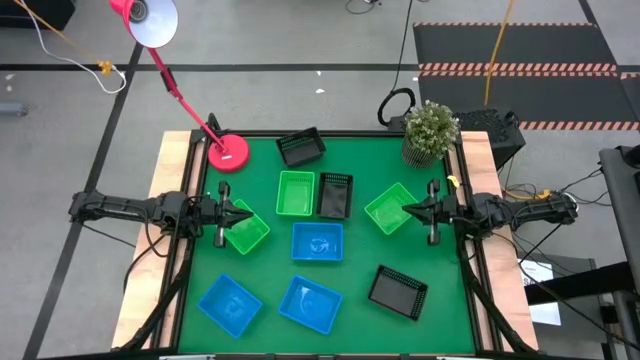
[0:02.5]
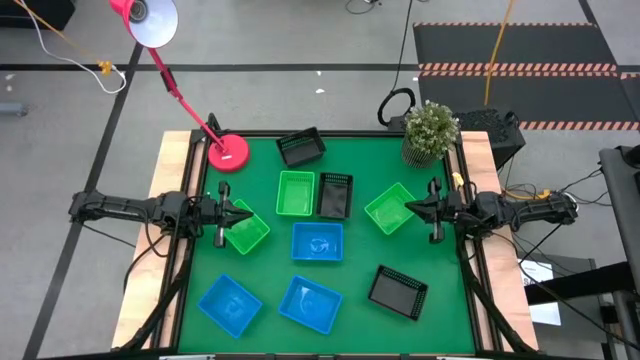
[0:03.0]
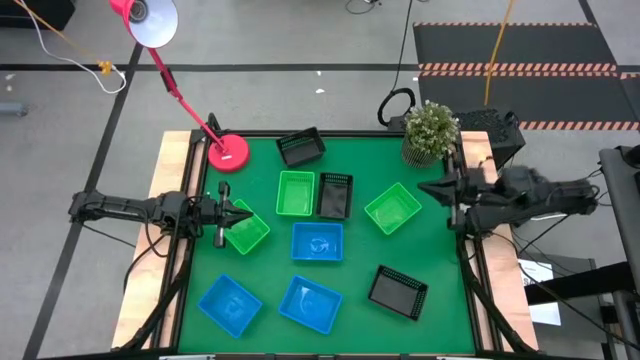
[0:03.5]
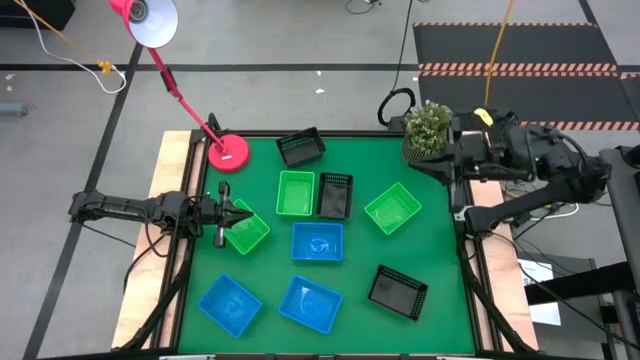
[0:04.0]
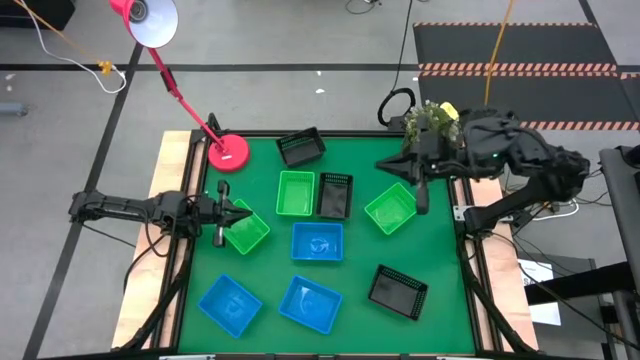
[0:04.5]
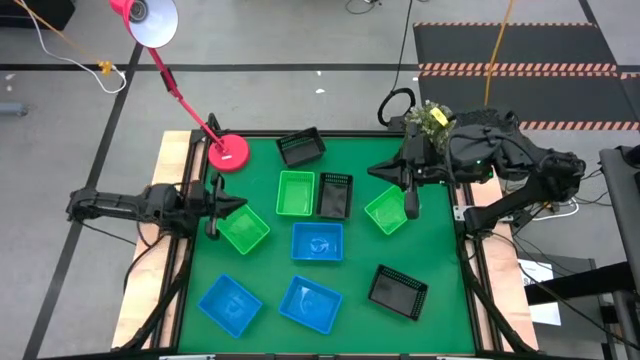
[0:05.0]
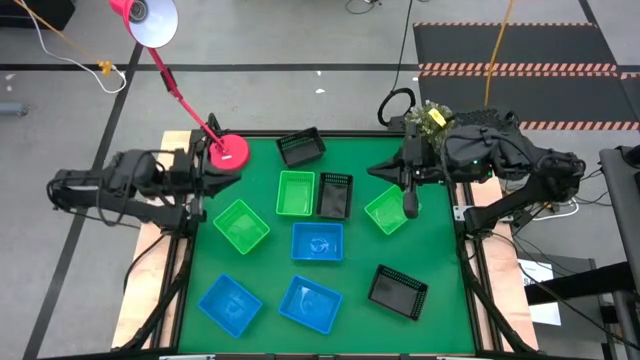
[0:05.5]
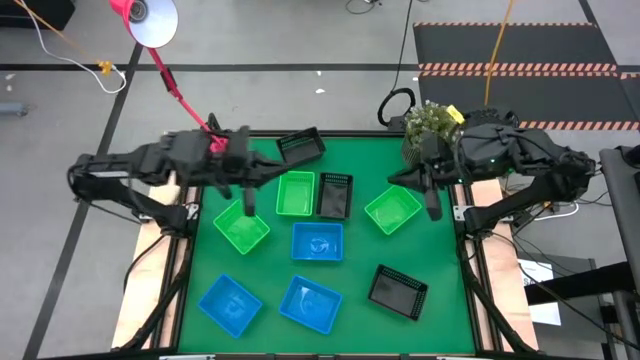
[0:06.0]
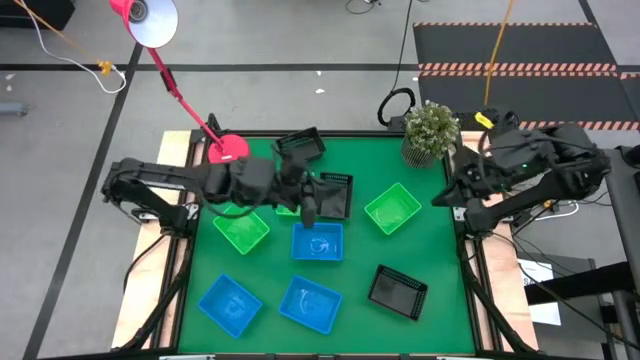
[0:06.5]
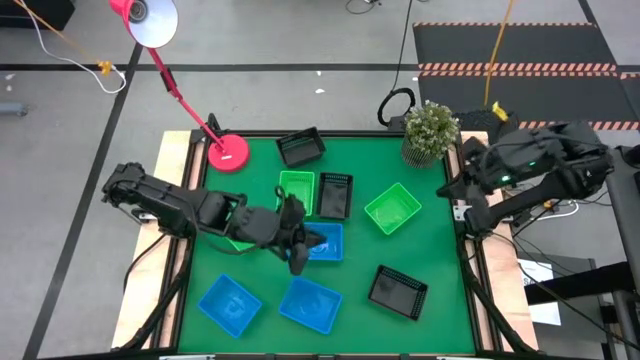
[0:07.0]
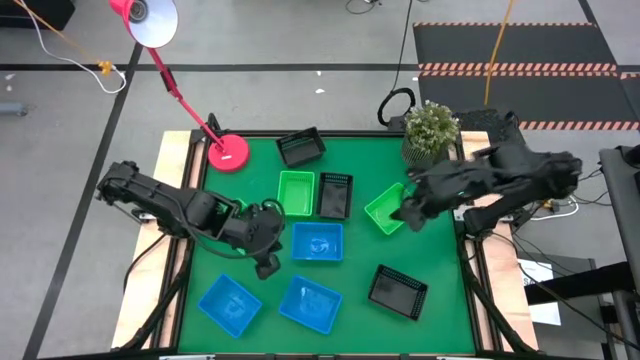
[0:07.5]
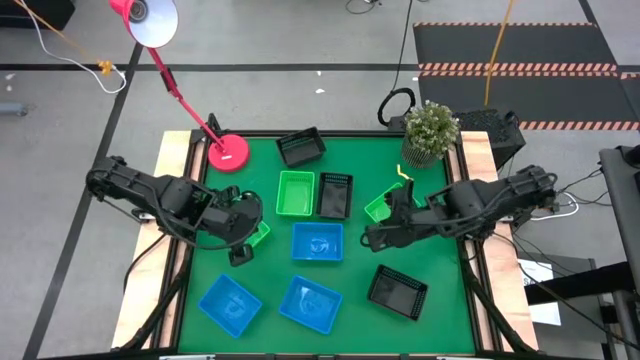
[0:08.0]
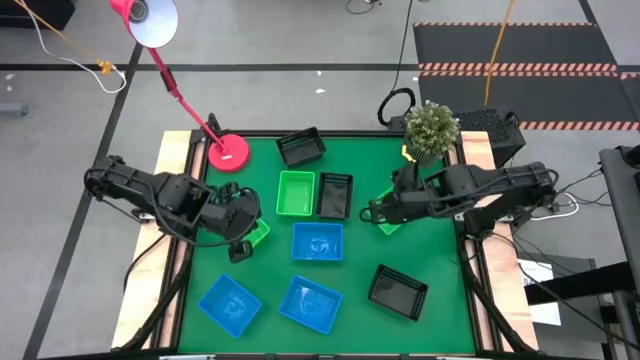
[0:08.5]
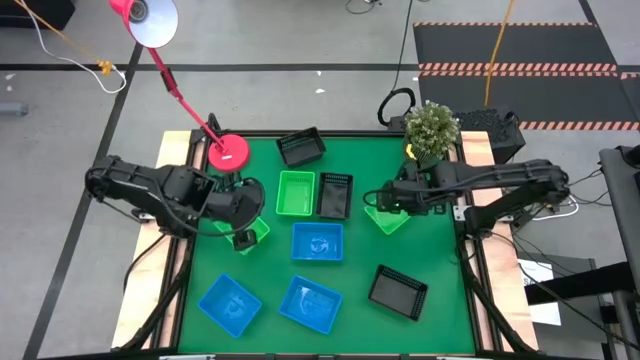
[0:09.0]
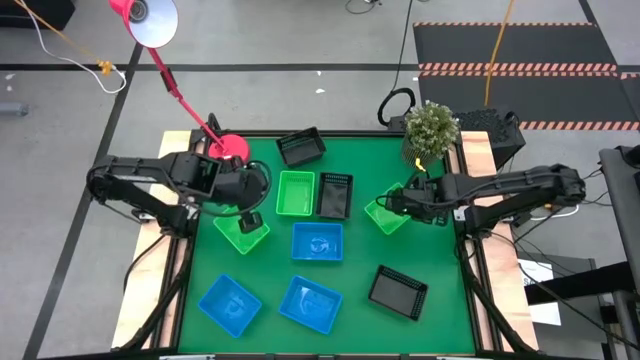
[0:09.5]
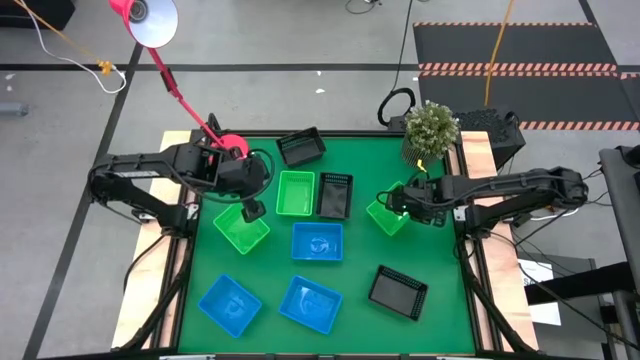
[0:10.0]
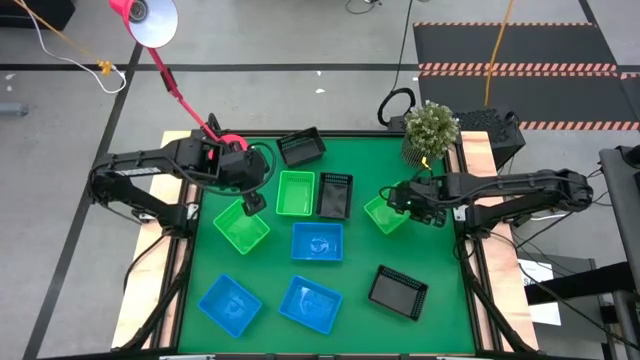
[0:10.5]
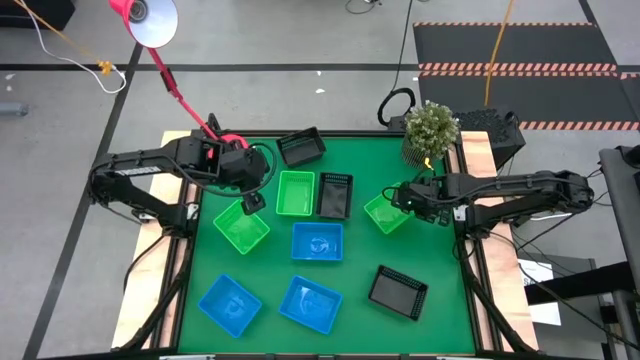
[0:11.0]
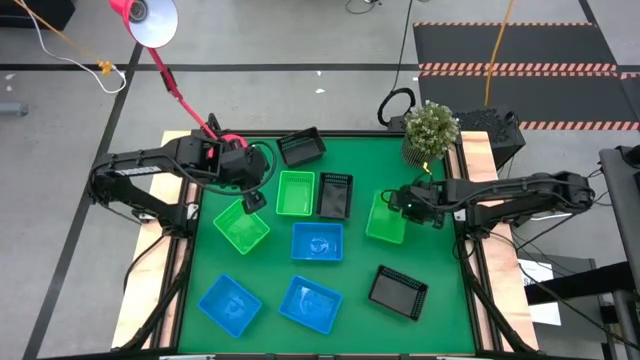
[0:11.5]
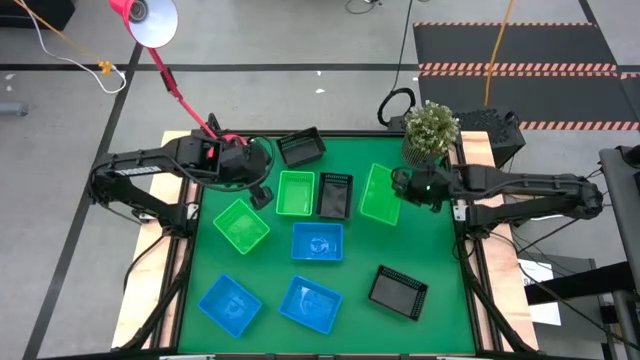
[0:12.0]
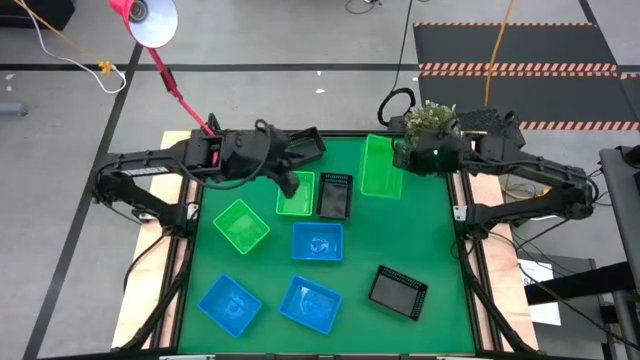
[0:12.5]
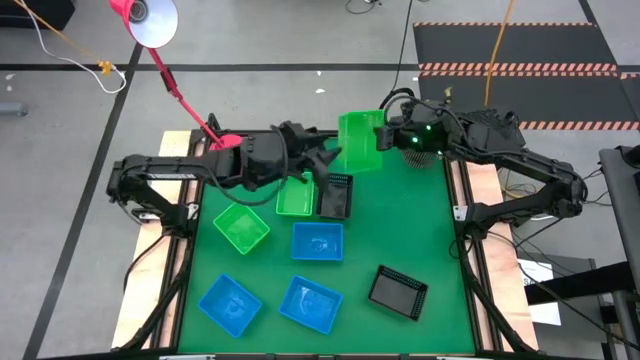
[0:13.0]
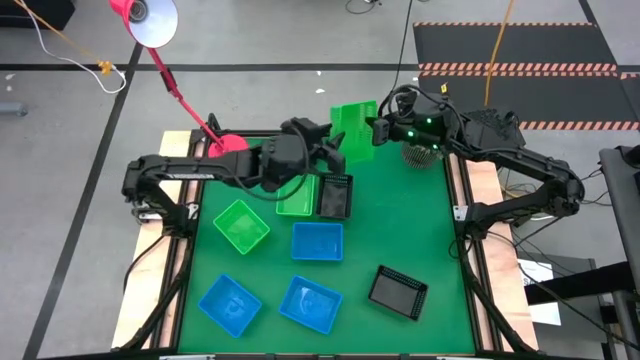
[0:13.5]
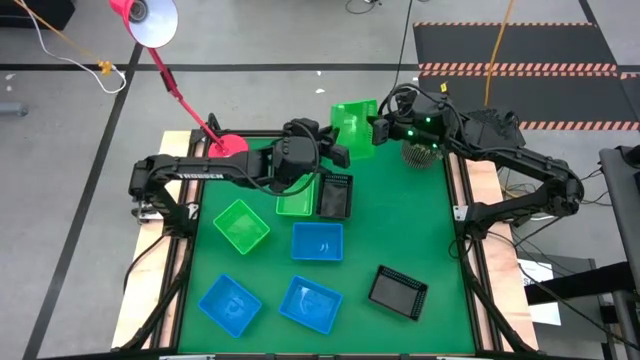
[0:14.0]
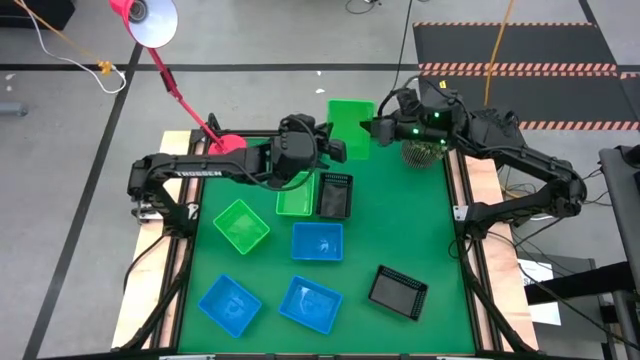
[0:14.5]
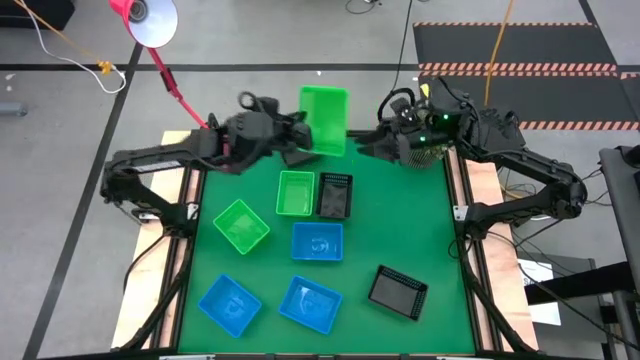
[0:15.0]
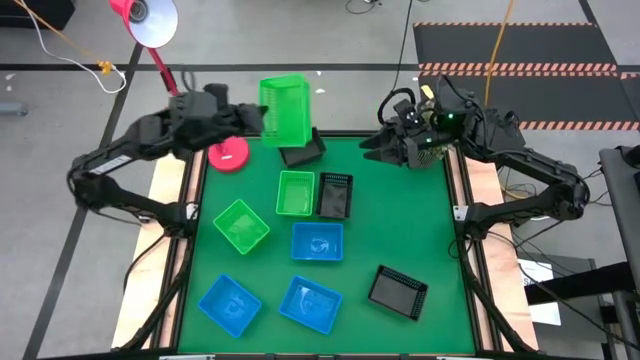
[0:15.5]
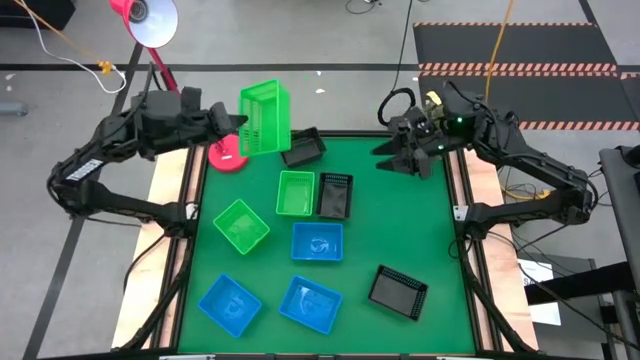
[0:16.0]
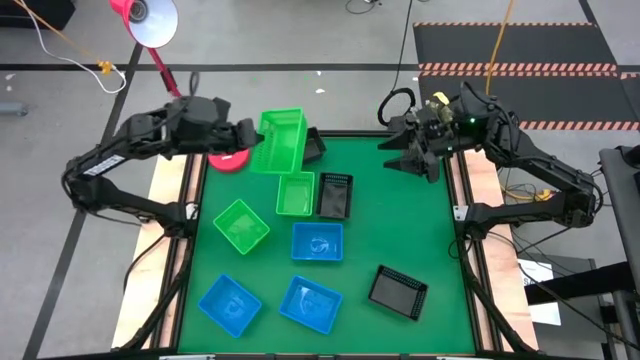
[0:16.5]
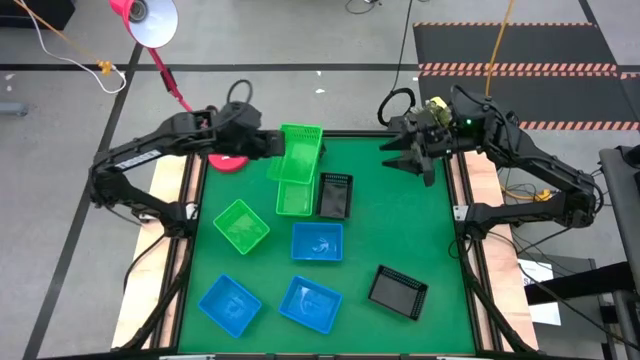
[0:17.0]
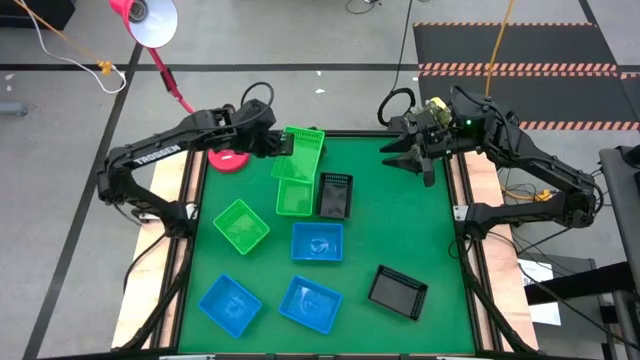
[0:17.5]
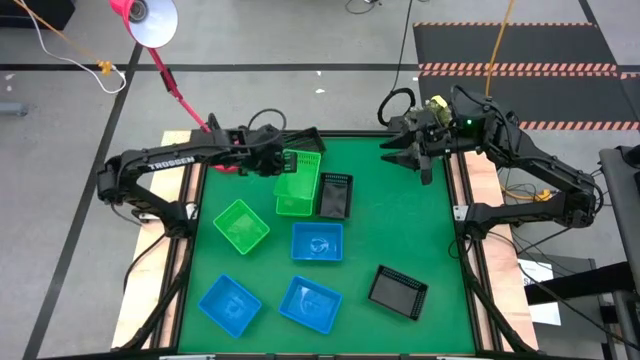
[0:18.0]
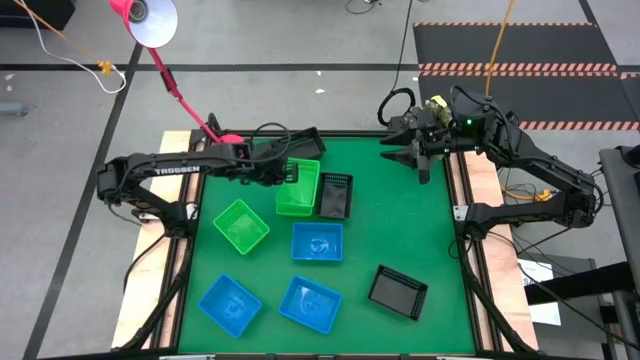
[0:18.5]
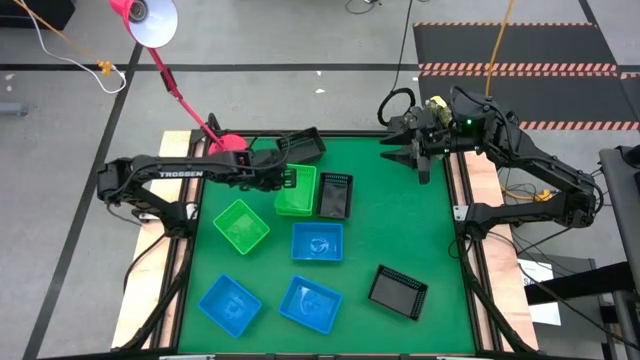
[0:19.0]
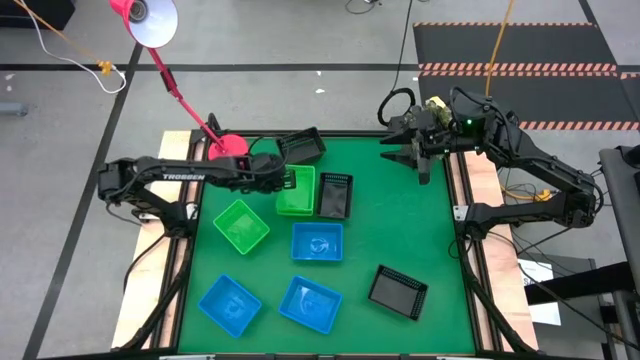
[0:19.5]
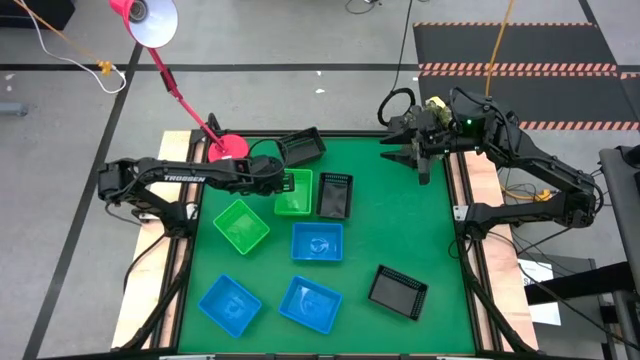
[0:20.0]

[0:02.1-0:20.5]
Stack the top right green bin on top of the top left green bin
